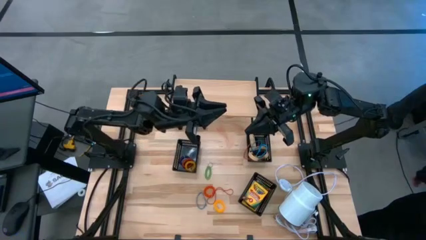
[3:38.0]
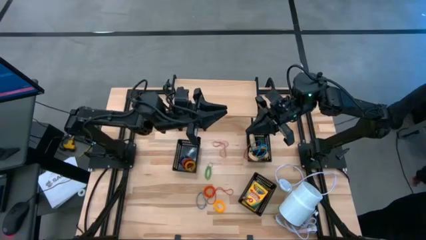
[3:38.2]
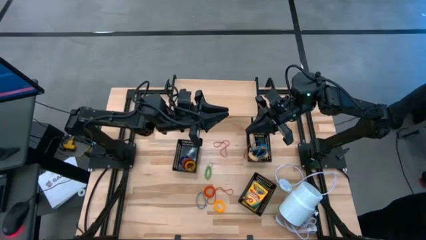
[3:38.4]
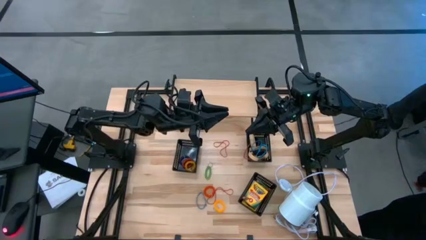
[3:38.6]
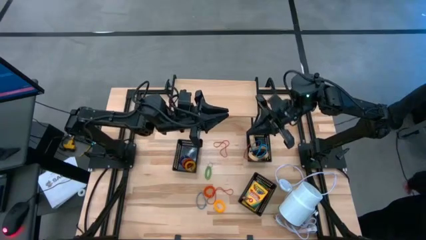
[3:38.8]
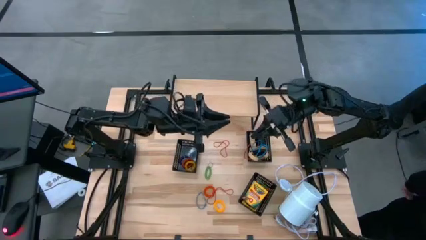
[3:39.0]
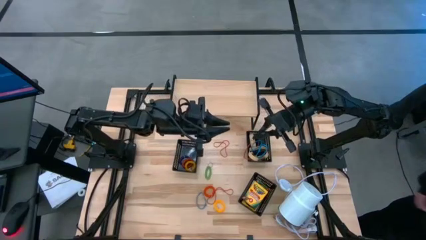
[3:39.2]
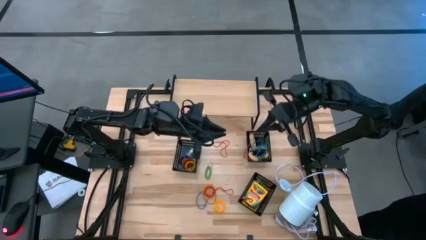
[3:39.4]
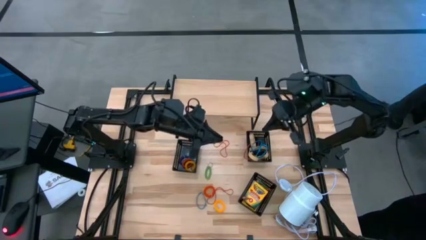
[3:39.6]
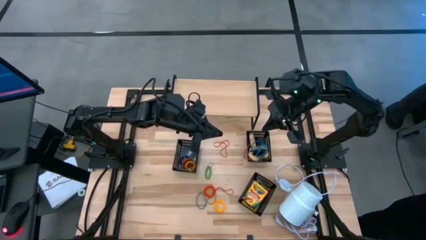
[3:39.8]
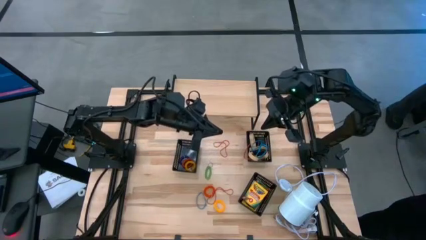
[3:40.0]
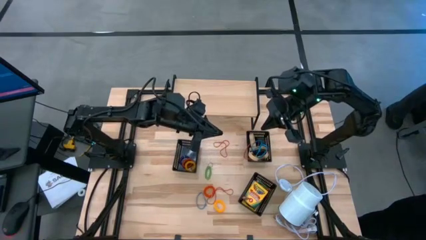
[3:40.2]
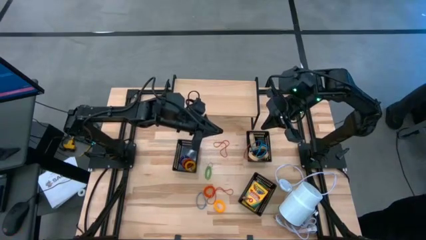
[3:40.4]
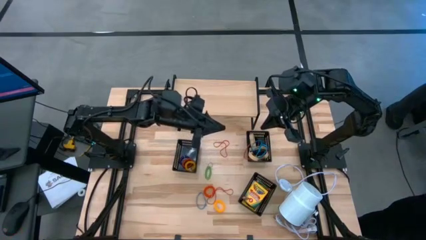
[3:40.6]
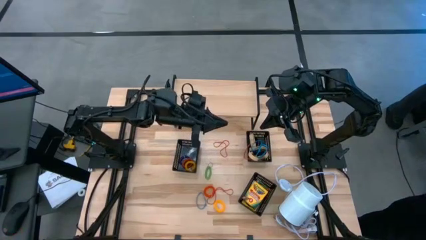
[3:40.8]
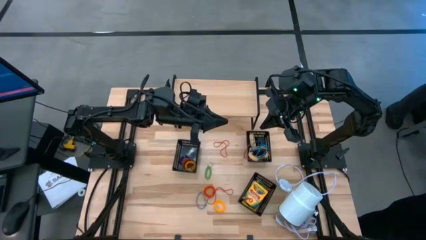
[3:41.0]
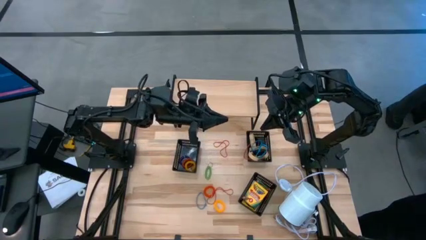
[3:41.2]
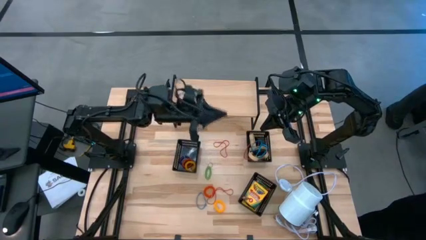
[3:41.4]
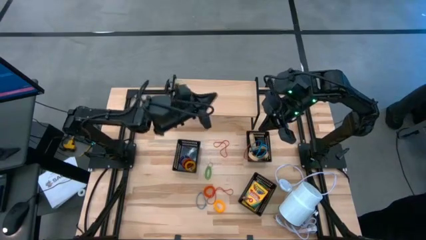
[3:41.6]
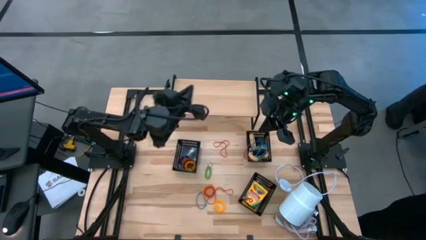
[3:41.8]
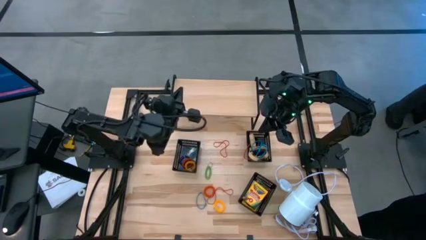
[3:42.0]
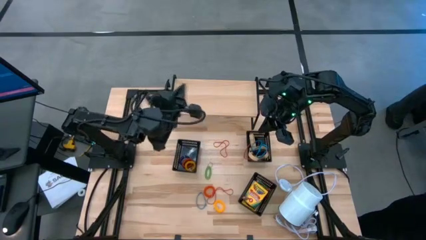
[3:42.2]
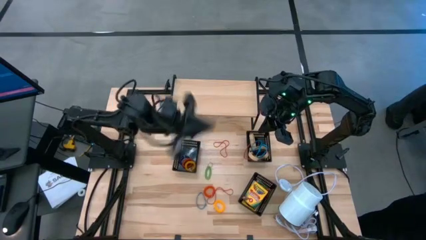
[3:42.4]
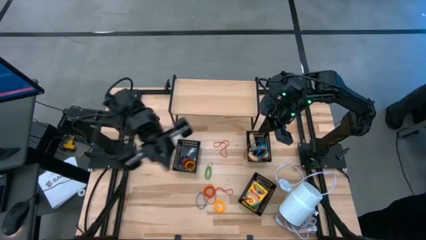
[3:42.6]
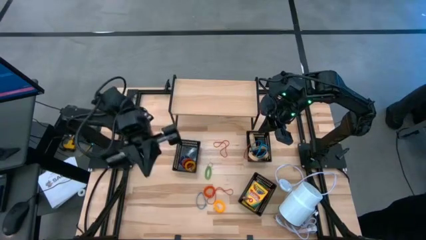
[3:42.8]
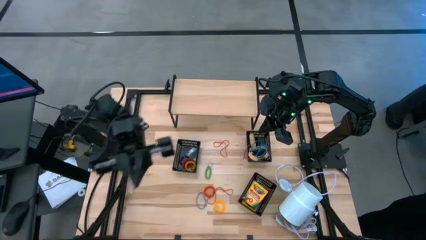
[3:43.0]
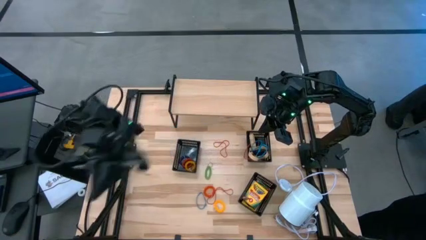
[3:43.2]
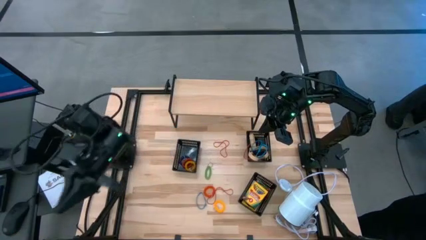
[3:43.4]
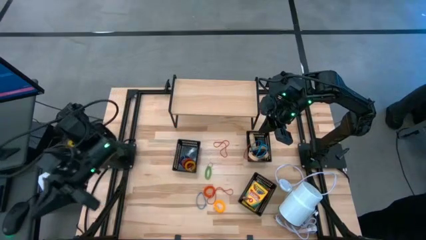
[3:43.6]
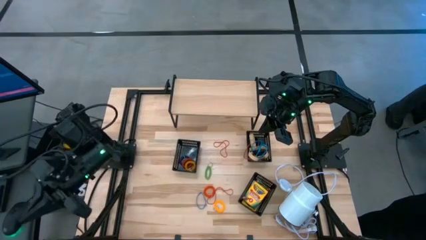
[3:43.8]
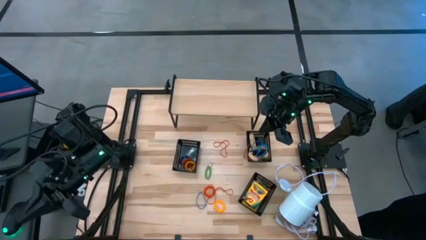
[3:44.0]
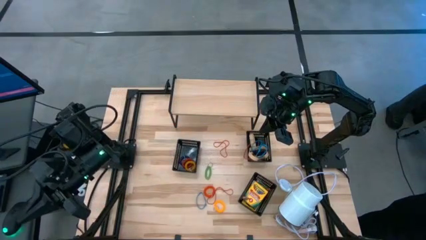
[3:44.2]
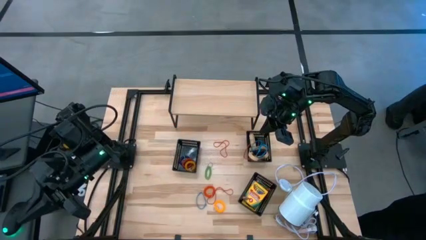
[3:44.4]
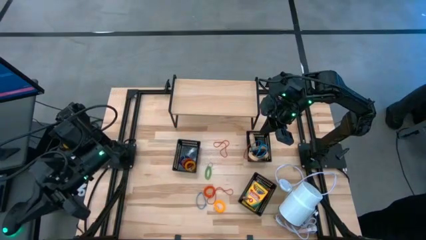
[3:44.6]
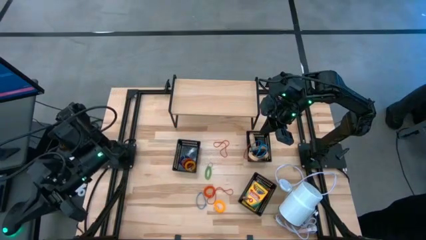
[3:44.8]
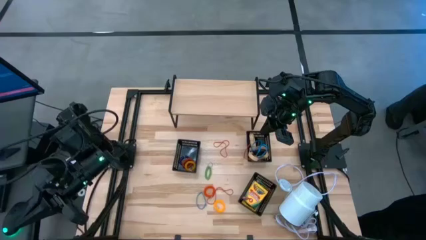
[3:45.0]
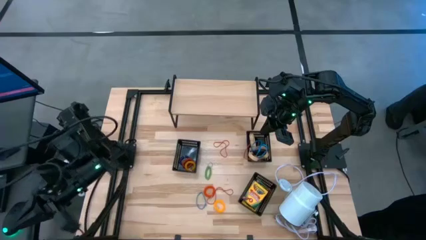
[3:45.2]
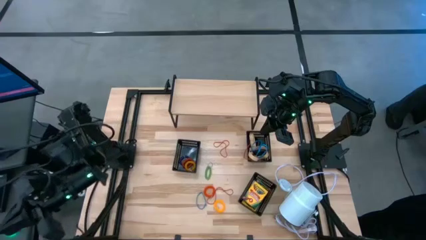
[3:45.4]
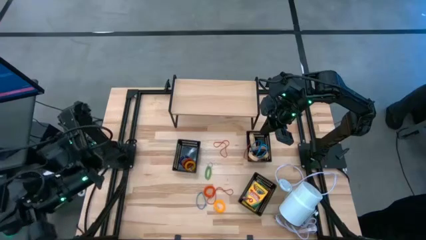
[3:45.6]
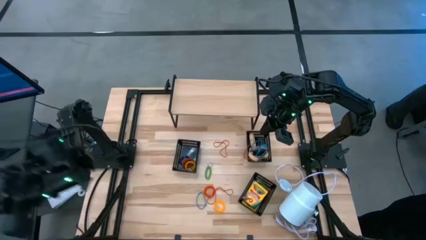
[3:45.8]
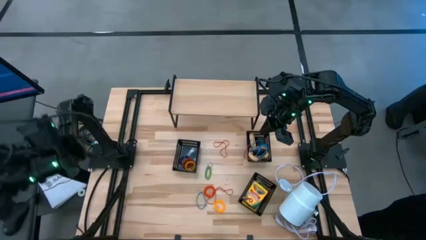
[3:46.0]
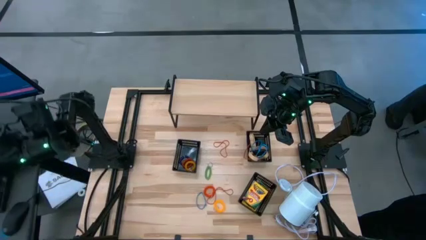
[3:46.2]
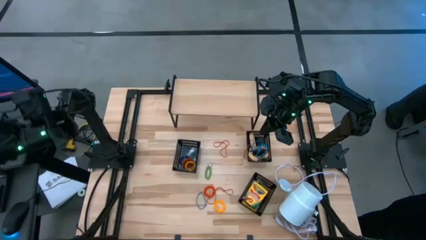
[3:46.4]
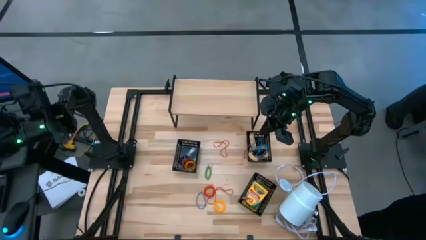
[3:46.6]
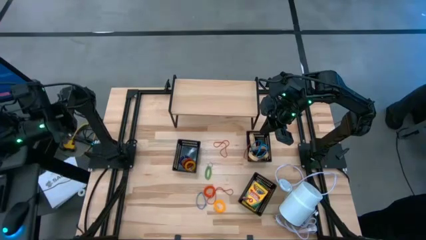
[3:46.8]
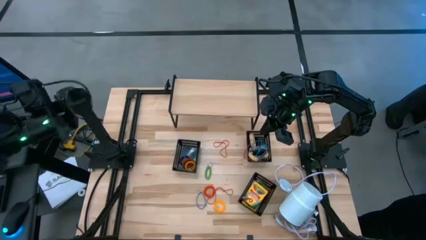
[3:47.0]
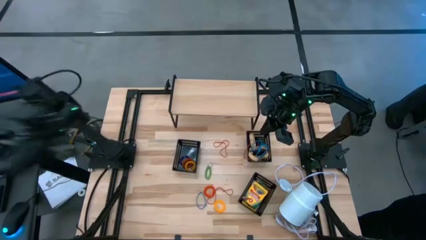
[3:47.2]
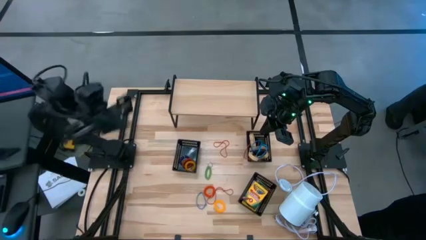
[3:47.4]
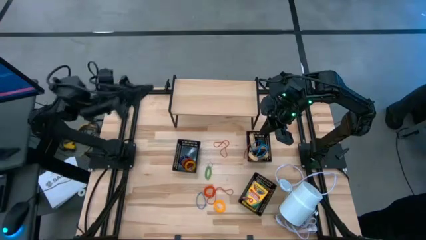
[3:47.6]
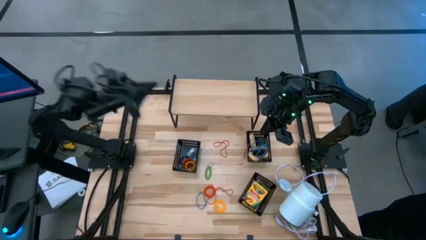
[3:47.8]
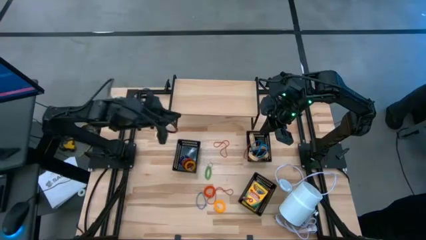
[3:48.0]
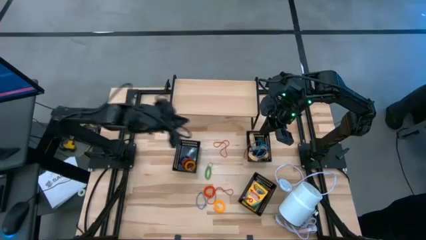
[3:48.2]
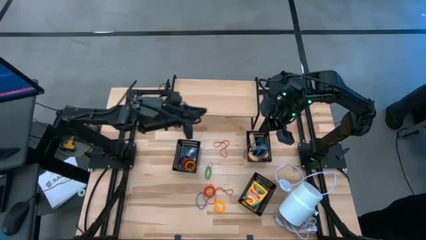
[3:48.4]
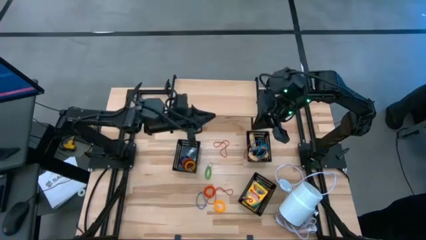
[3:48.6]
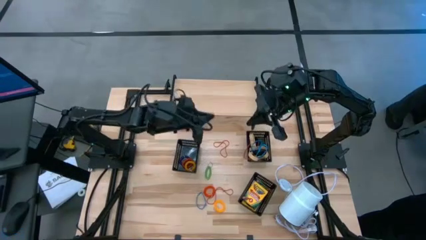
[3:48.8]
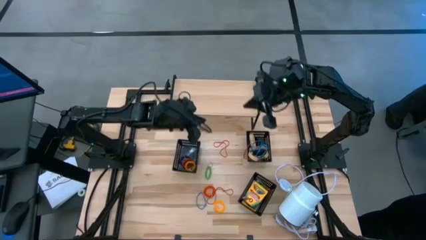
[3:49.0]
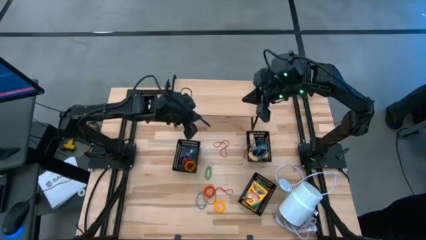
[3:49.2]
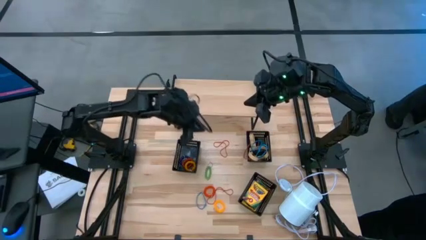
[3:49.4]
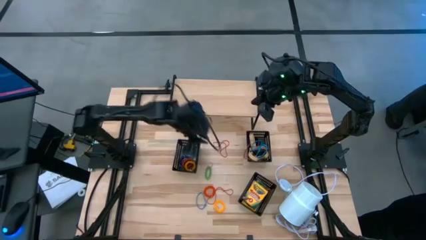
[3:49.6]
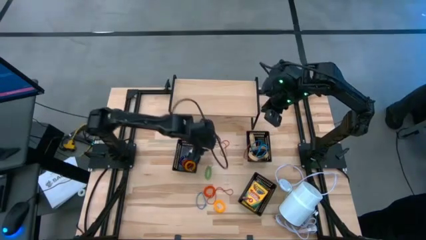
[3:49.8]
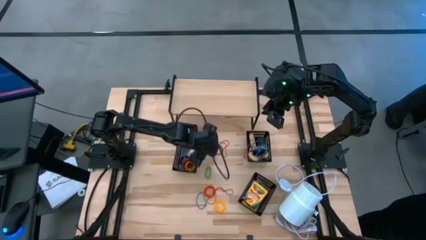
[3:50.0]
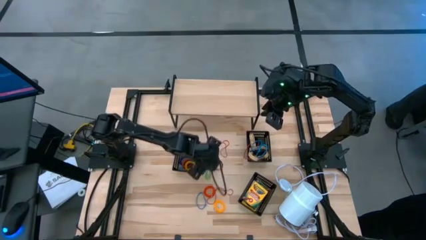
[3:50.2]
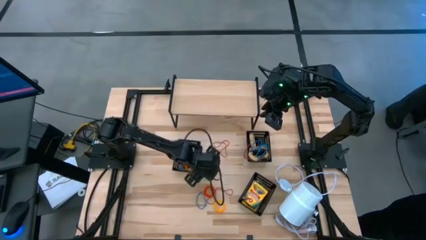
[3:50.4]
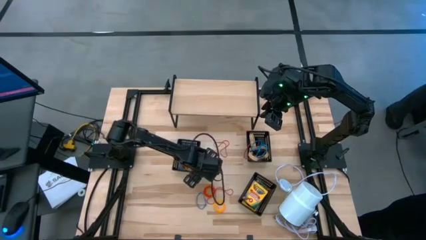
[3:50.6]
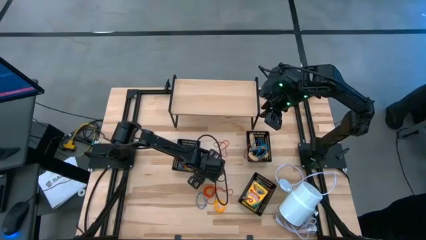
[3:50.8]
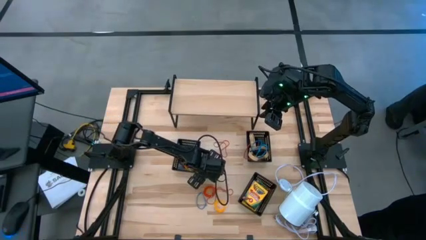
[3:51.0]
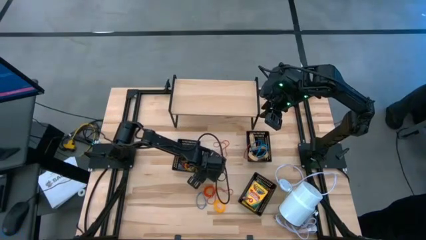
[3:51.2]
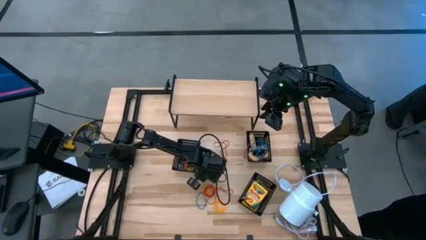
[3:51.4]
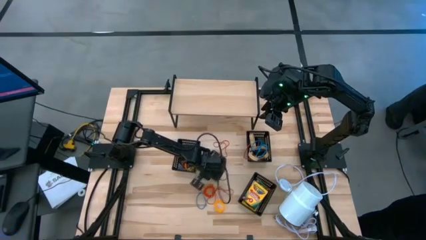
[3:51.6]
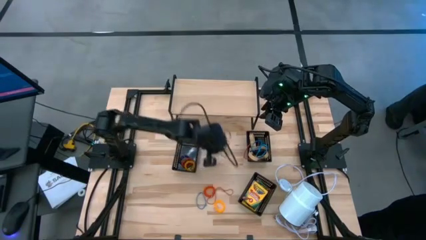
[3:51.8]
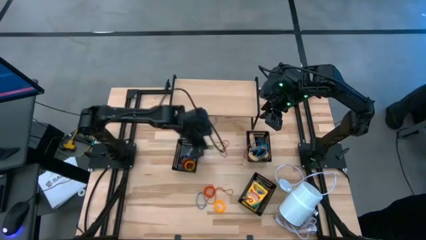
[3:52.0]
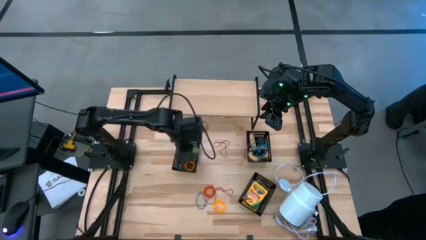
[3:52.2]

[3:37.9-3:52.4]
Task: Pick & Place Office Desk Supplies
Put the green spring keychain into the left black bin

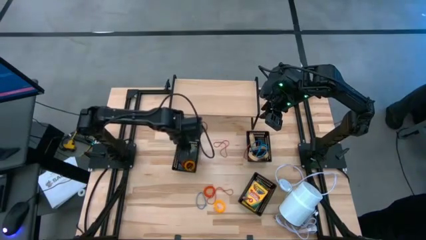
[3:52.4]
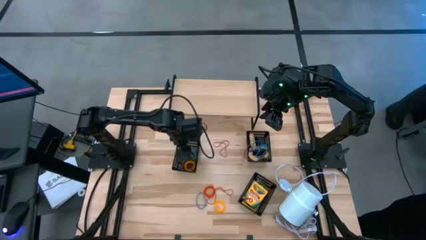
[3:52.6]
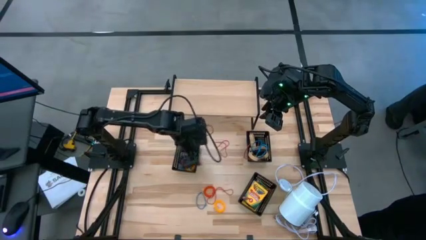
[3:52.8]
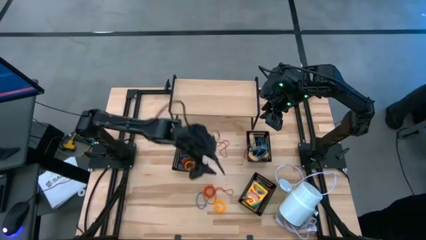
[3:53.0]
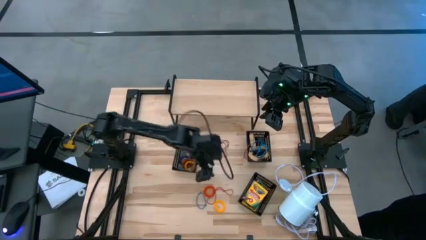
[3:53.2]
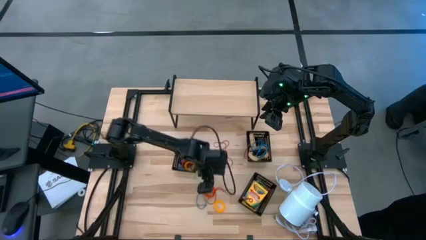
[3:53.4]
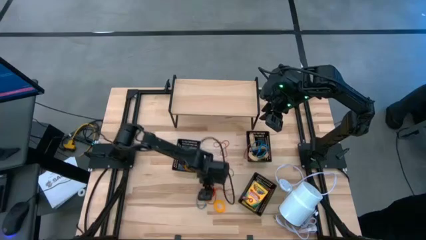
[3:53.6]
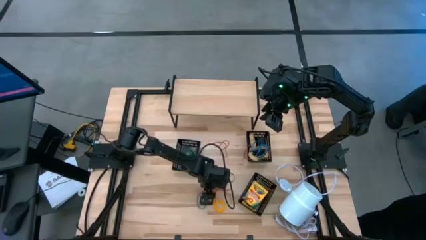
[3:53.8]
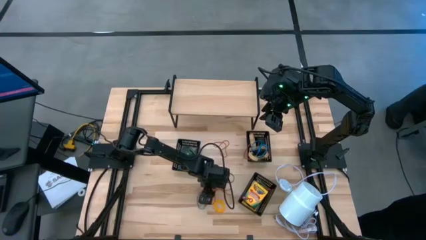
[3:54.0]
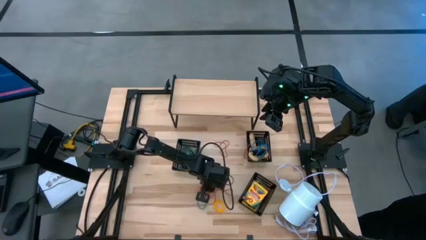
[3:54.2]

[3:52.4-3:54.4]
Put the orange spring keychain into the left black bin

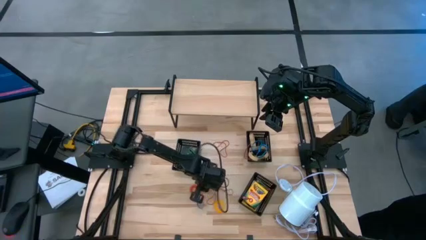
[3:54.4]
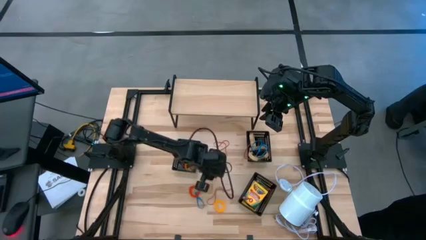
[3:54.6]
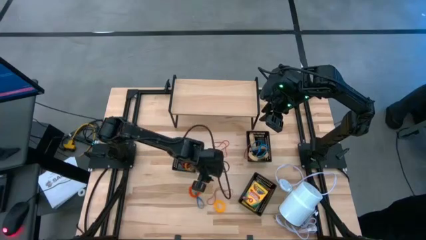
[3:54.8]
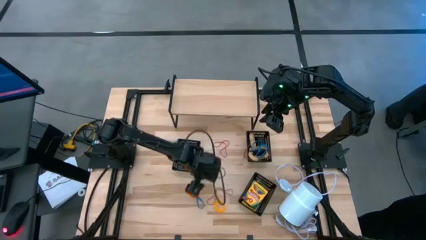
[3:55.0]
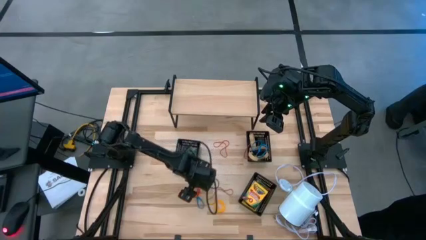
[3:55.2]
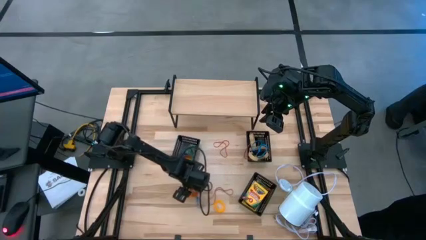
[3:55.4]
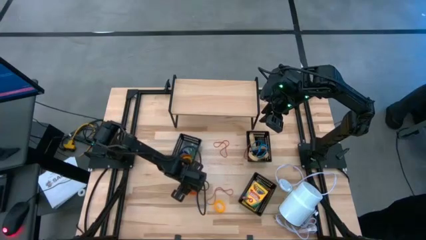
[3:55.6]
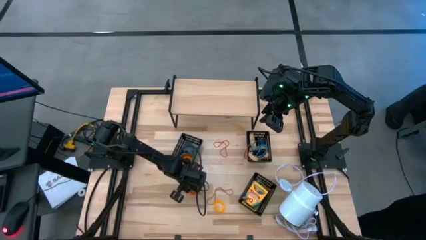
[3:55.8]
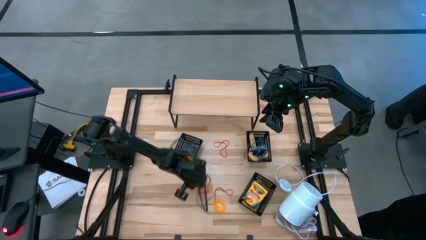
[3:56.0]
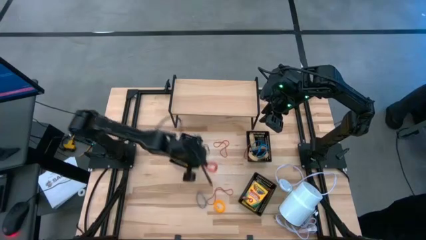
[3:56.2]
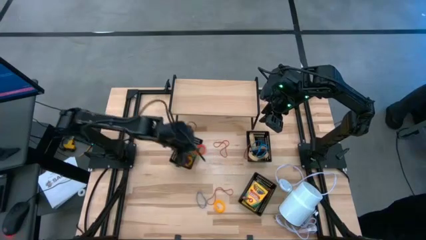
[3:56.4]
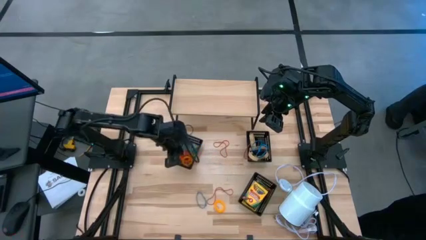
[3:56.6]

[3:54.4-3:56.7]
Put the orange spring keychain into the left black bin
